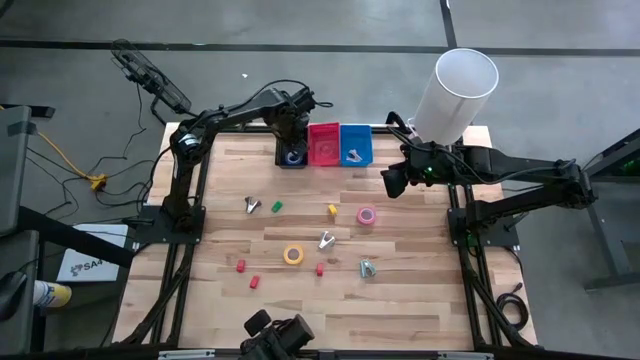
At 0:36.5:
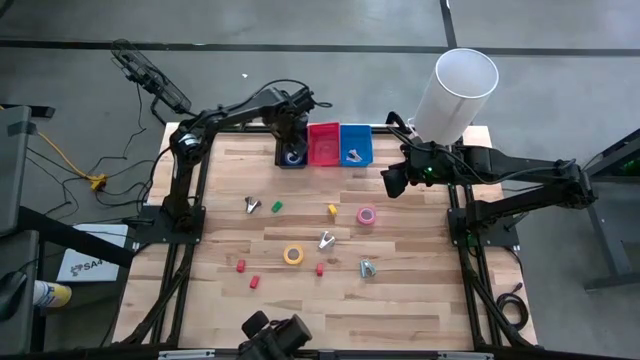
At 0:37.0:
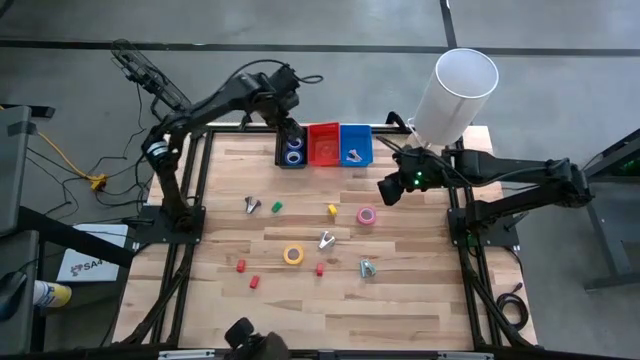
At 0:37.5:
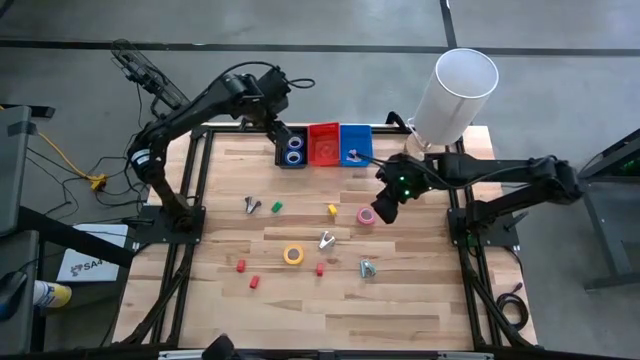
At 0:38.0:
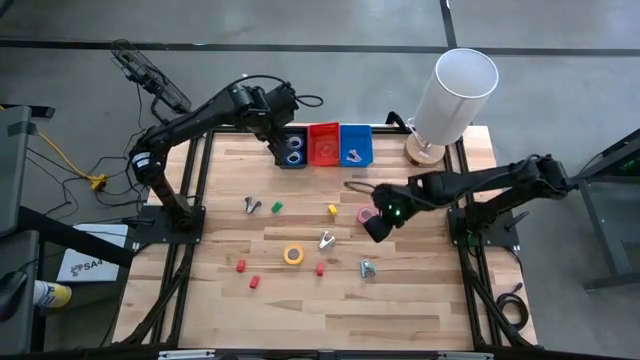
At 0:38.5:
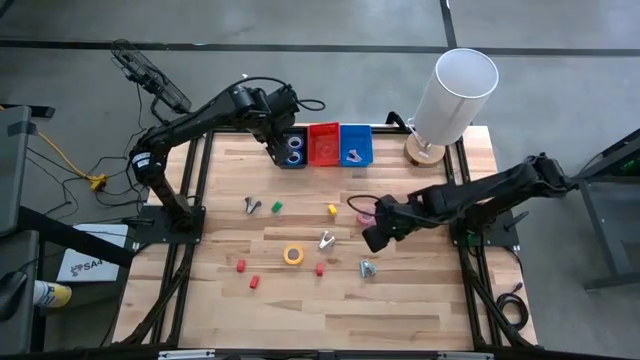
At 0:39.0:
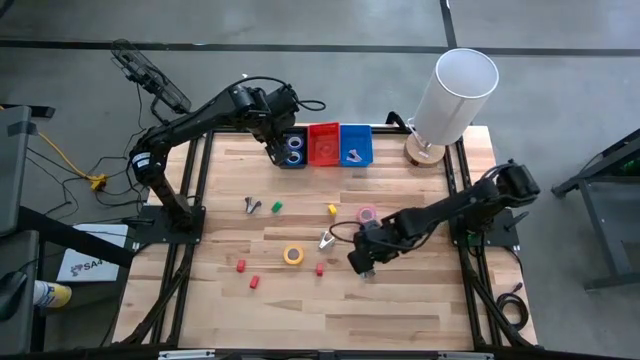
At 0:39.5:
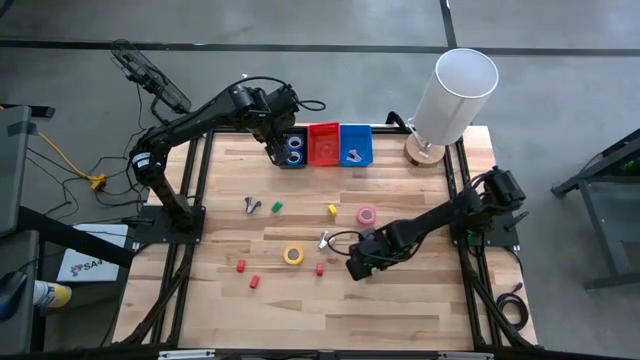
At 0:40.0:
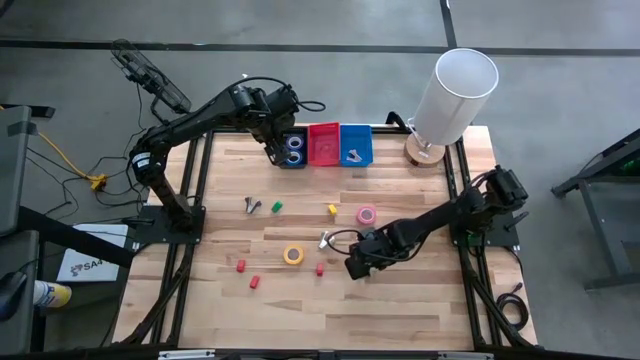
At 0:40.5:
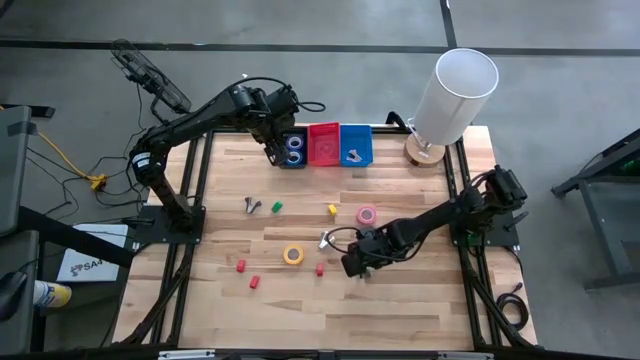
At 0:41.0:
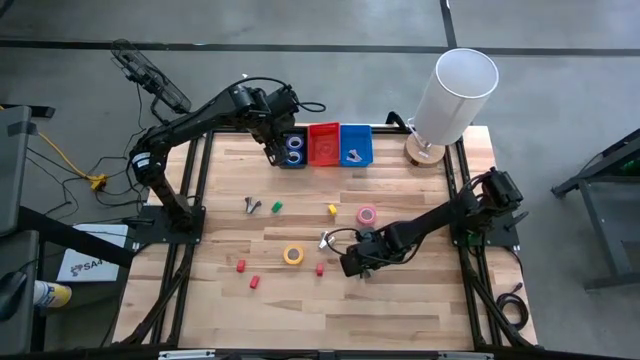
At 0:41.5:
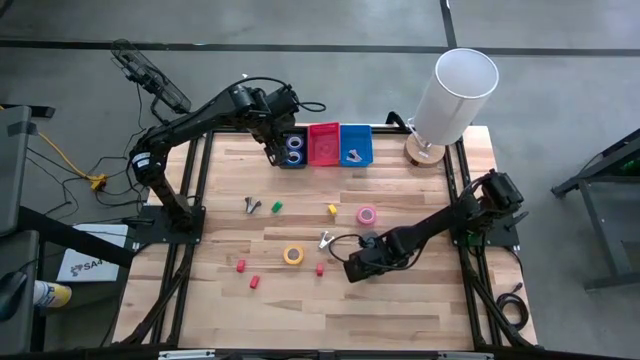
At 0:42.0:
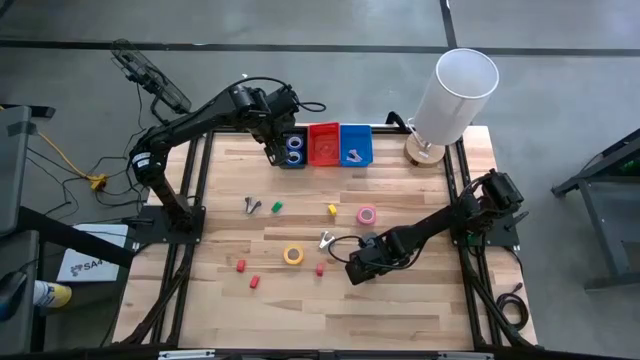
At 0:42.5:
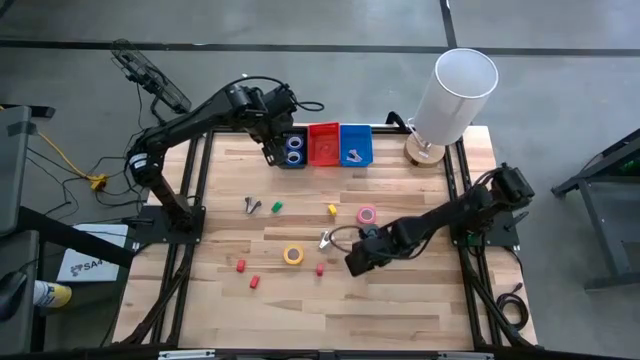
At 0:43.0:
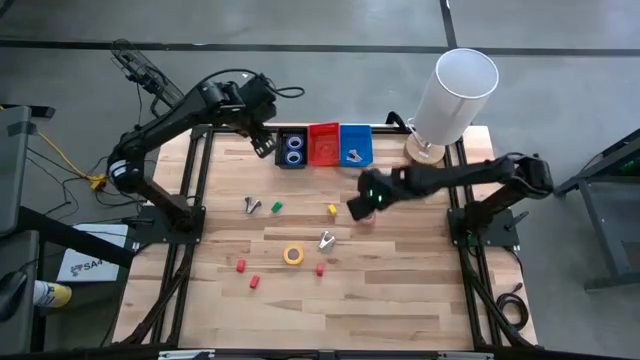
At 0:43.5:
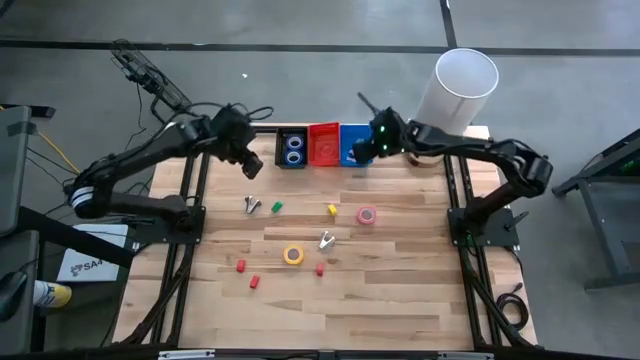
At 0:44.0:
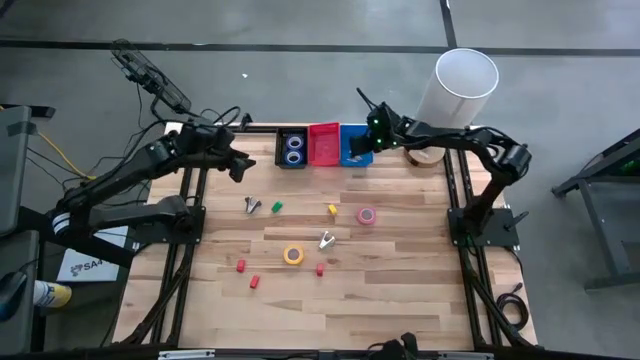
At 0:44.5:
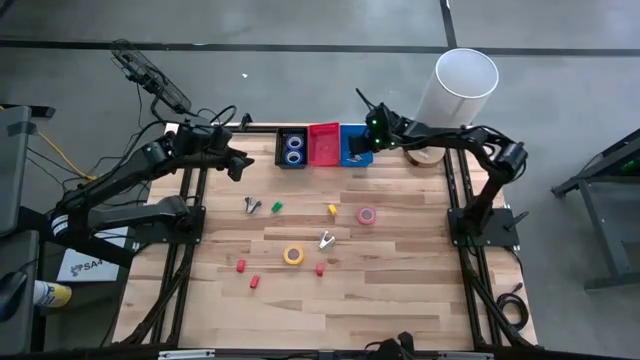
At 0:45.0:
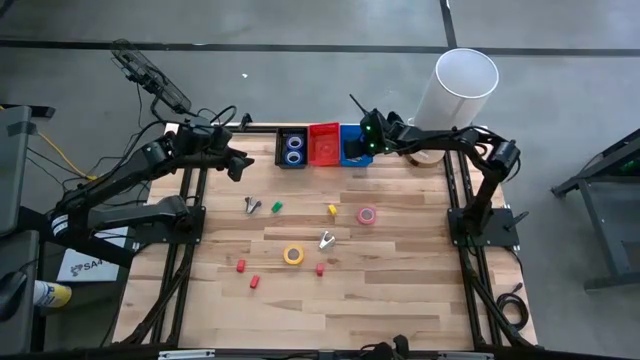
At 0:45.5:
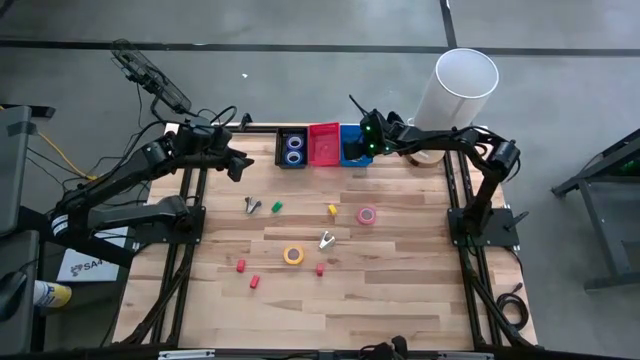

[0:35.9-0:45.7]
Task: Pick and place Stapler, Stapler remover, tape
Put the light blue staple remover into the blue bin

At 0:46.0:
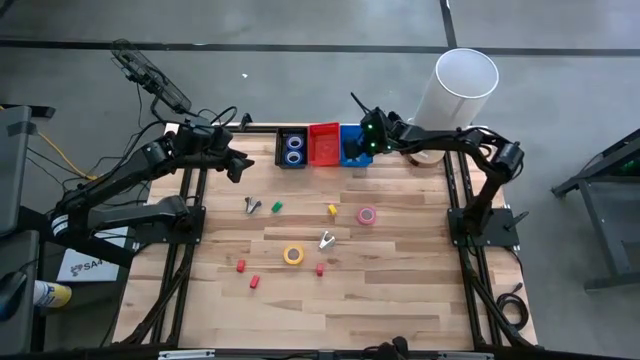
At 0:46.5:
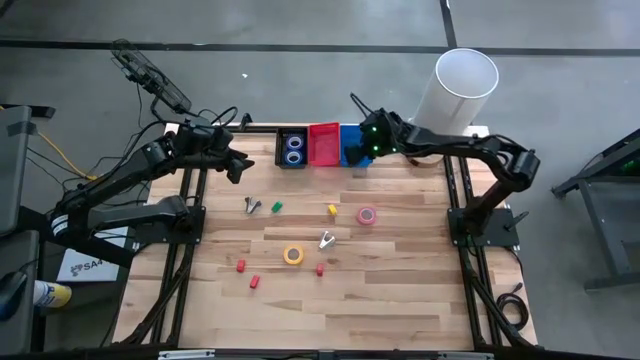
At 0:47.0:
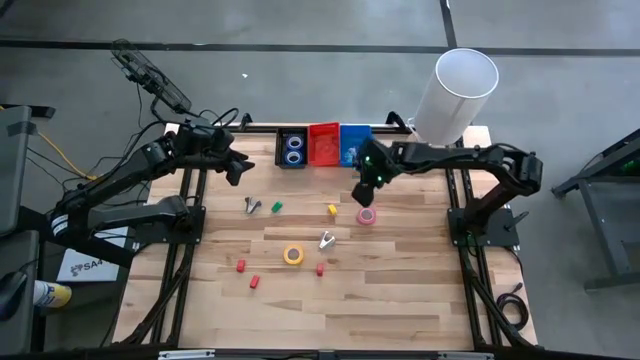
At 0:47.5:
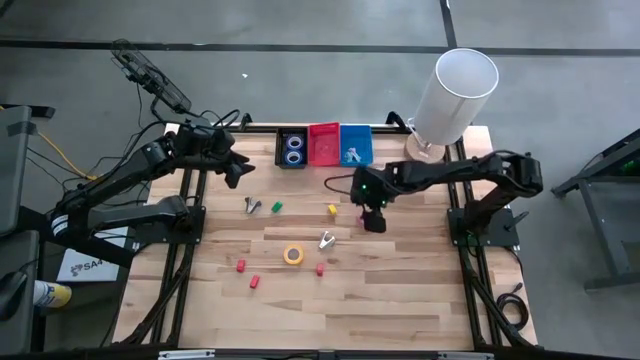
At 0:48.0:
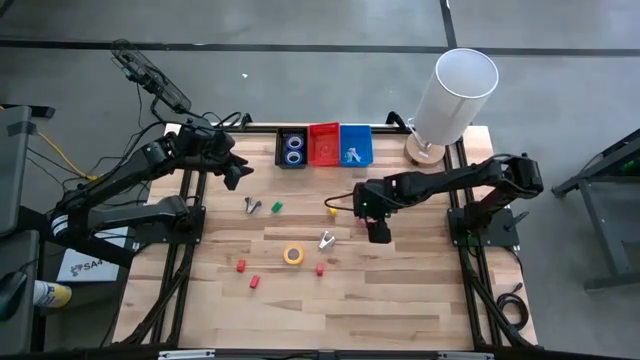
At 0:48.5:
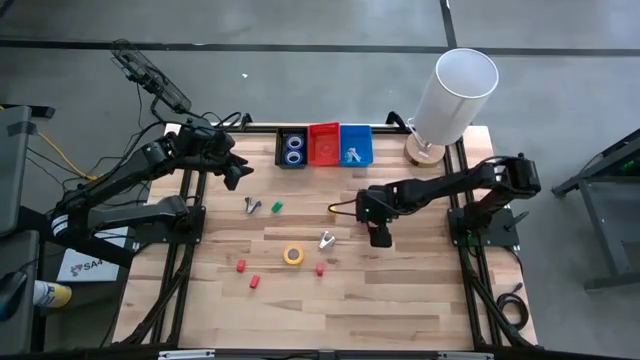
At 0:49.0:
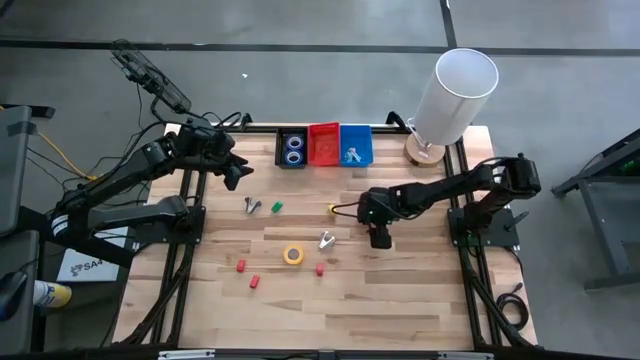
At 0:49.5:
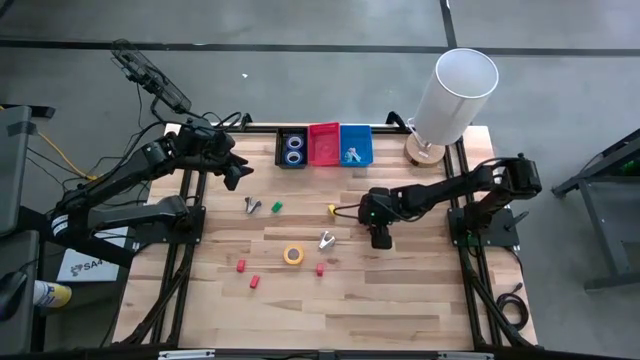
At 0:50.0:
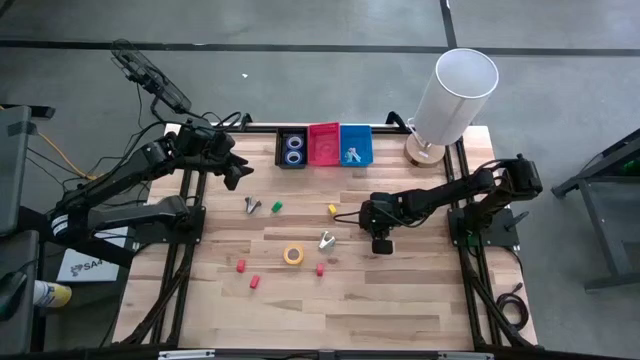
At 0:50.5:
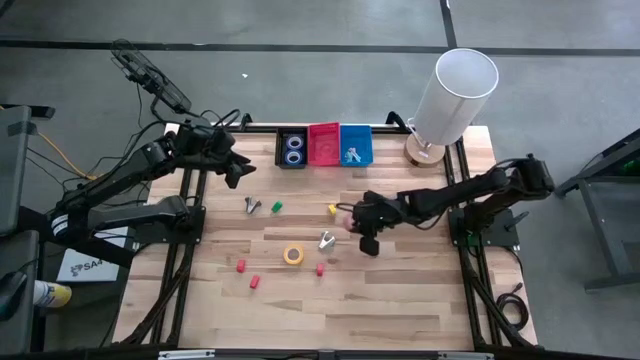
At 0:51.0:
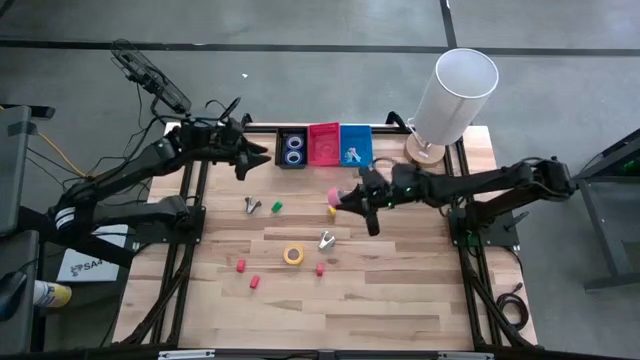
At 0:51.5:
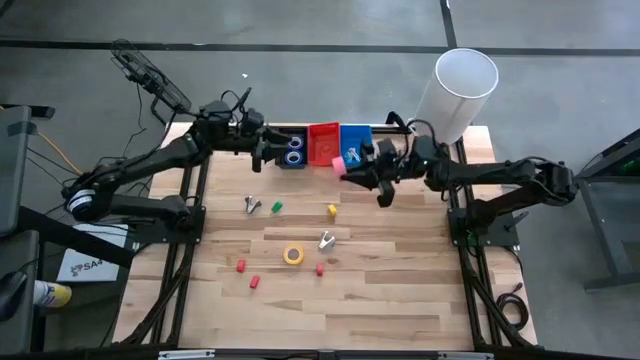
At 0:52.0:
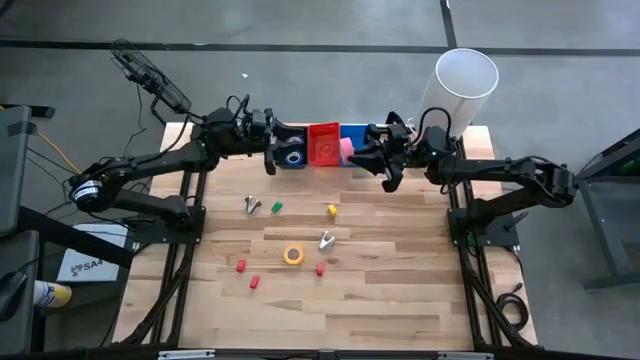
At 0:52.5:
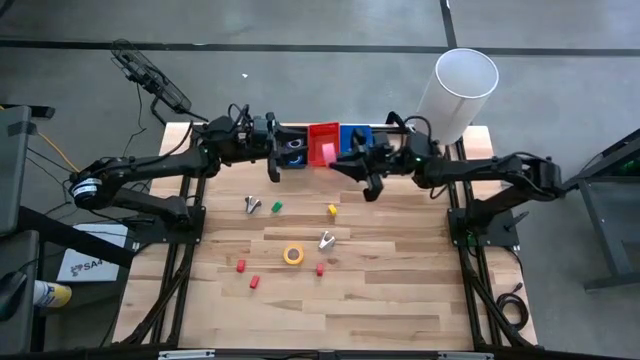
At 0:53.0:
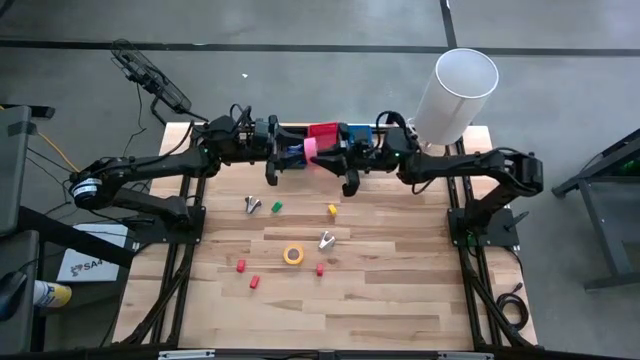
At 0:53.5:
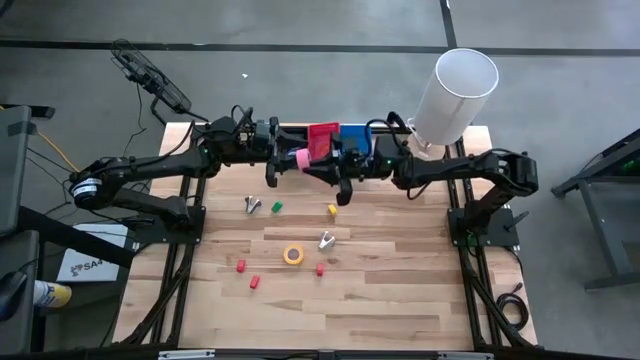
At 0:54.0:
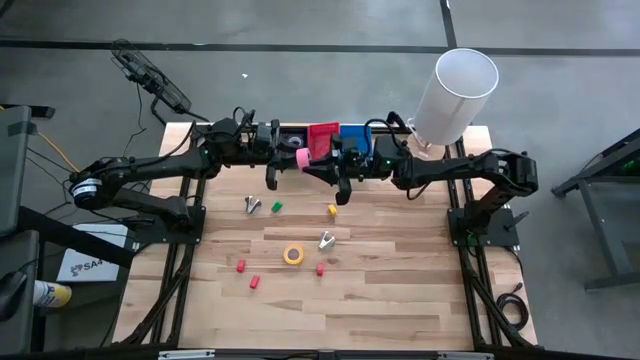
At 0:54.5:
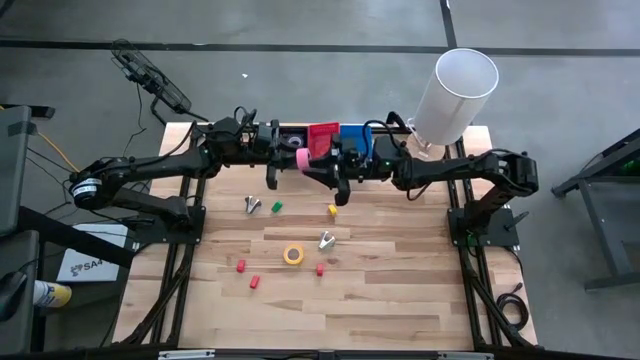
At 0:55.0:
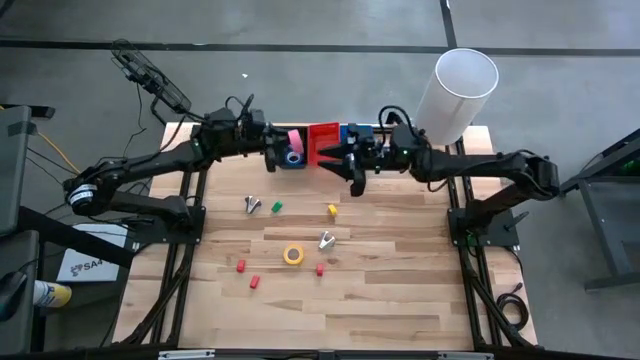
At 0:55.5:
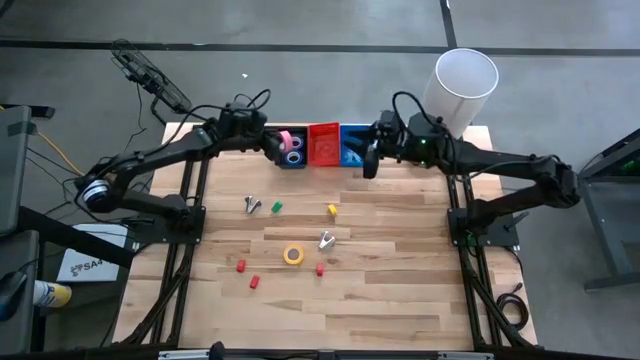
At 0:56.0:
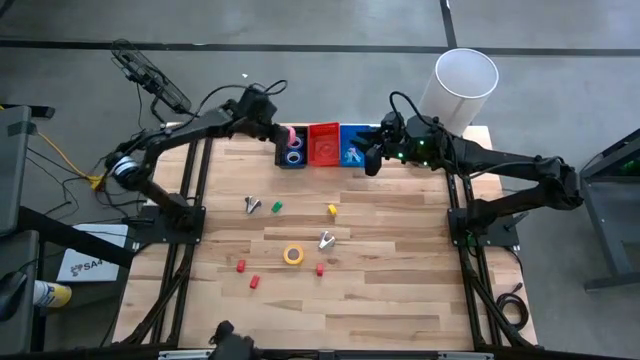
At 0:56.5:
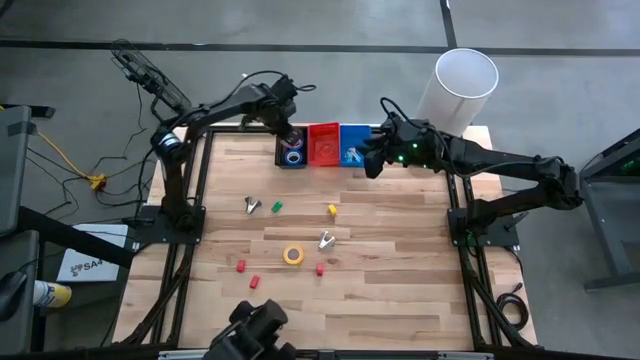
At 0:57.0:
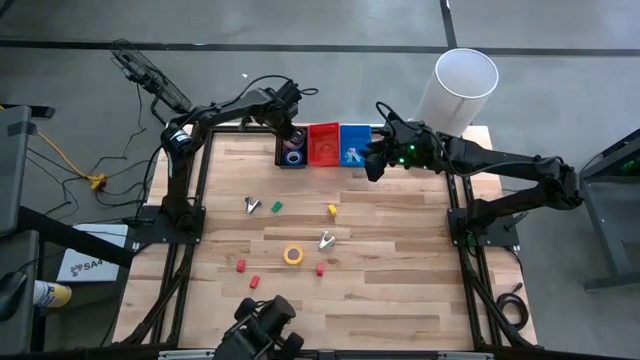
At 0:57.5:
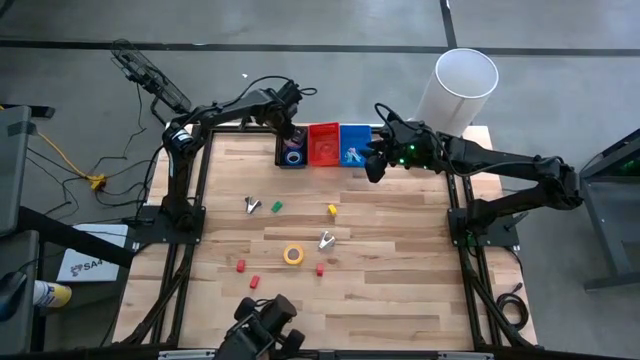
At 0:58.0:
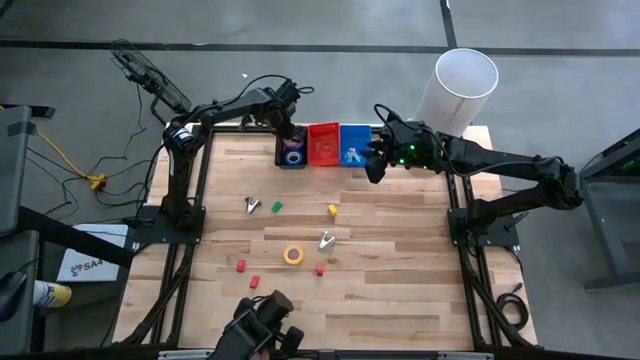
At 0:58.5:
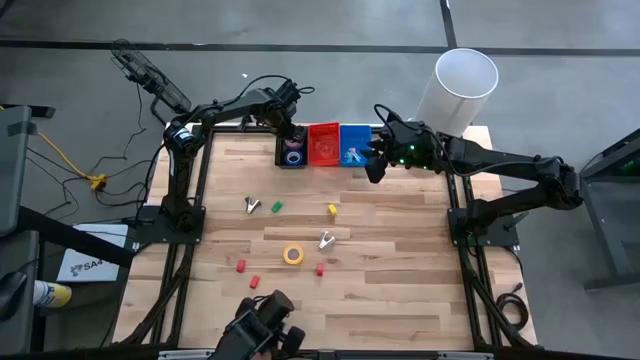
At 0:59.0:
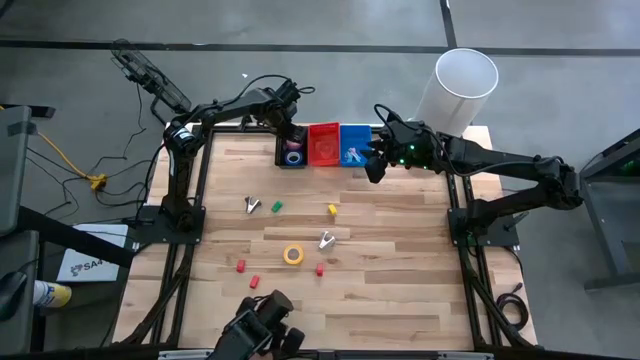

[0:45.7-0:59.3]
Put the pink tape into the black bin
